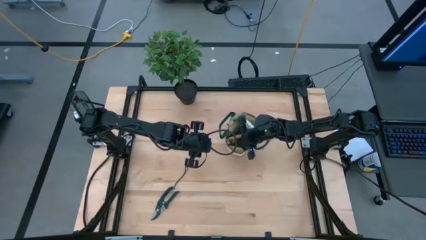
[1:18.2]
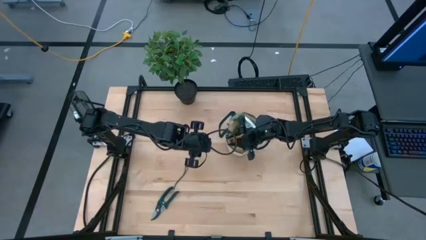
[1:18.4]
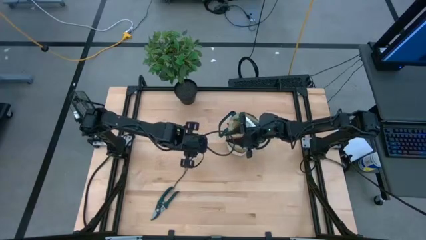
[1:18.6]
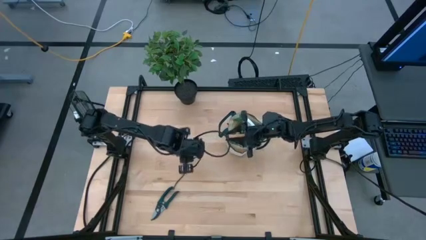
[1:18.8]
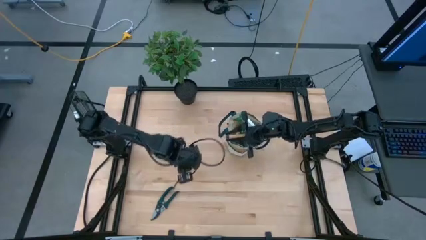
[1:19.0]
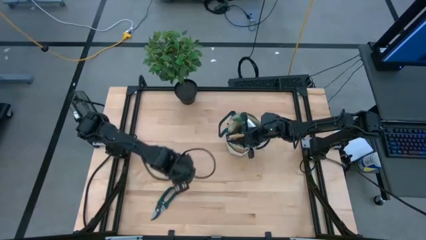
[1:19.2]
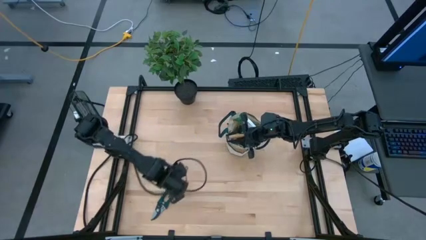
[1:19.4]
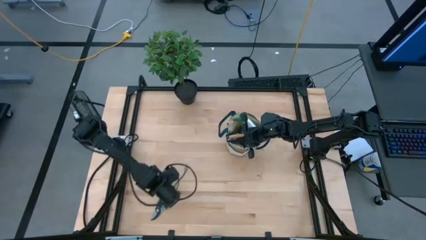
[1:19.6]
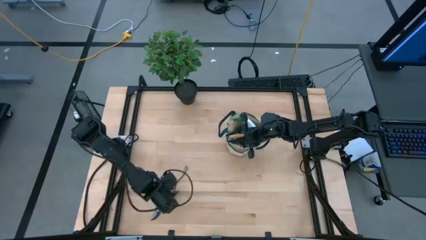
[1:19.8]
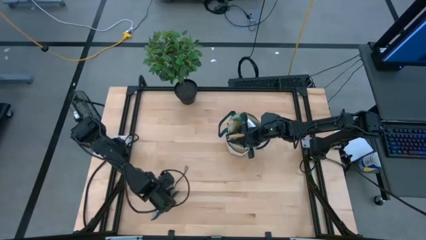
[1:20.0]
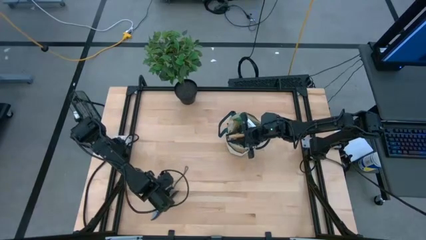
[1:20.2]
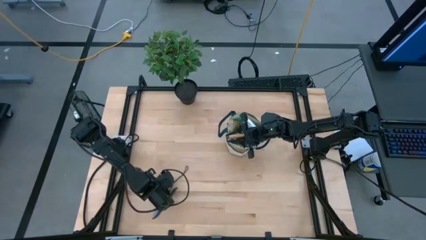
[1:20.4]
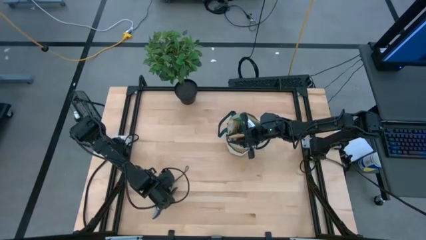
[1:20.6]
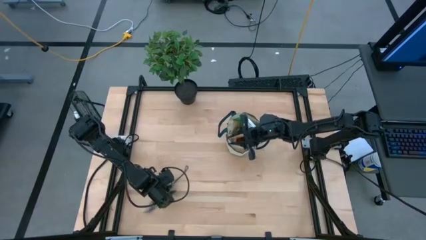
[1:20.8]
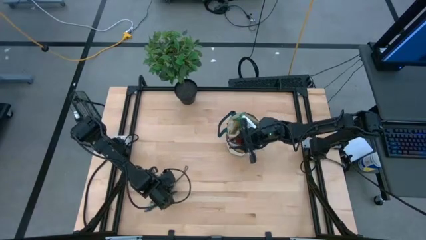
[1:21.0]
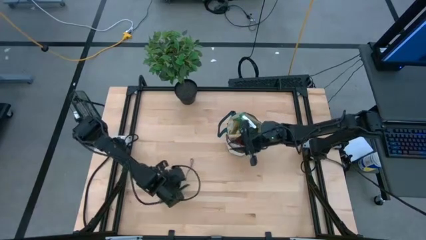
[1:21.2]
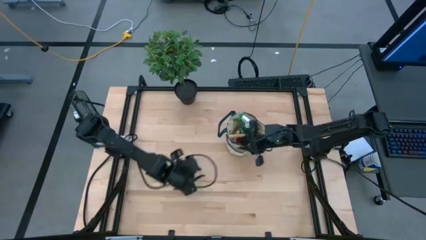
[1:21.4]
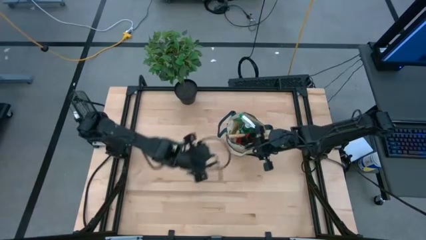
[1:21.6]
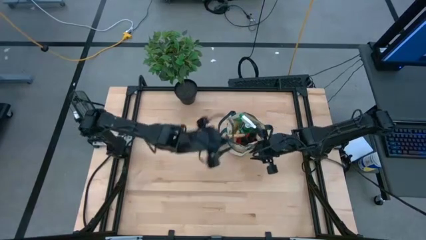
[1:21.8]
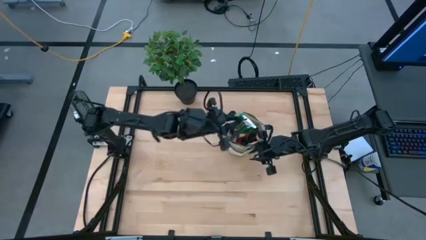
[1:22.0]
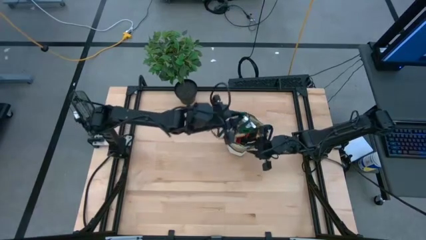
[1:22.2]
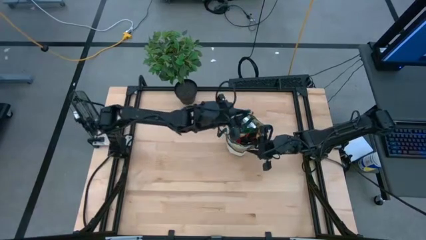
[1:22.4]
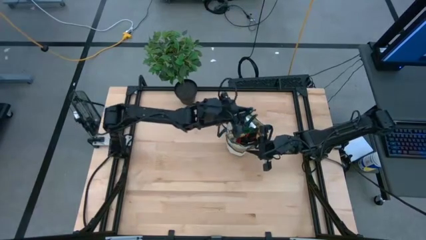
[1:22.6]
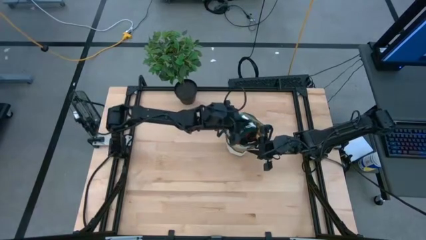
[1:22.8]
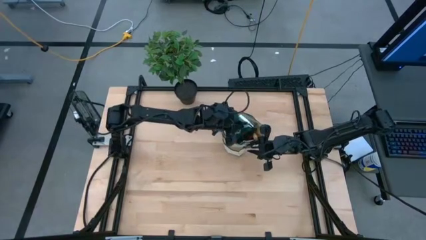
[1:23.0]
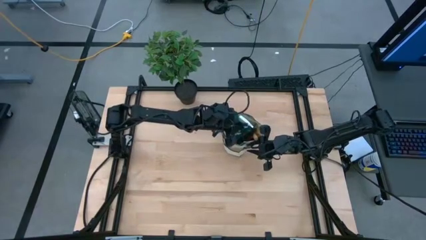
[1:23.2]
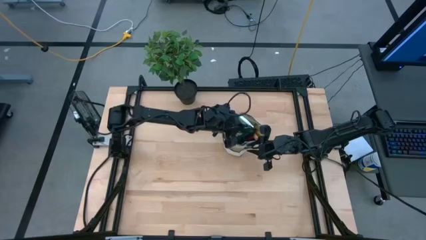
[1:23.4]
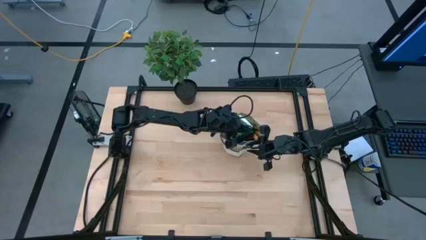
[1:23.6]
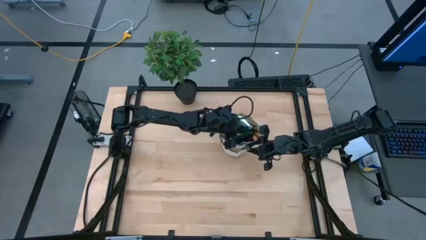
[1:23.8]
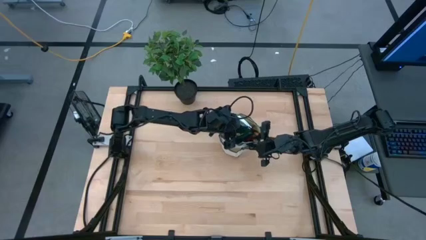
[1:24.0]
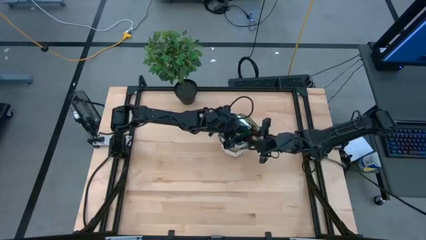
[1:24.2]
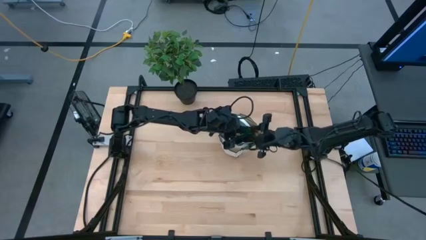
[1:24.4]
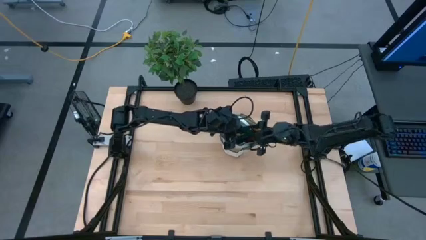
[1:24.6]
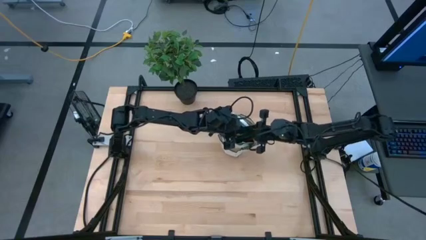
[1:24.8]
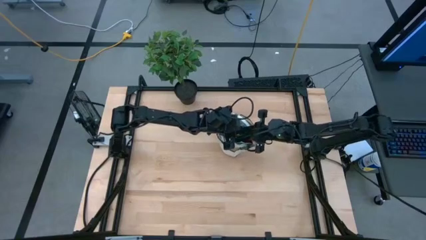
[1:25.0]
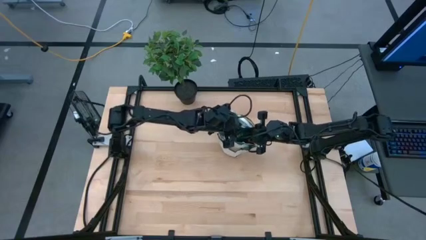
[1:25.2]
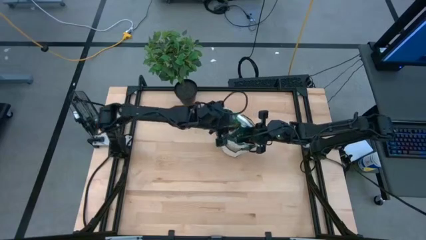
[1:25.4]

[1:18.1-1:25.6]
Task: Pick & Place Garden tools in Gardening bag
Put the green shear scissors into the light brown gardening bag

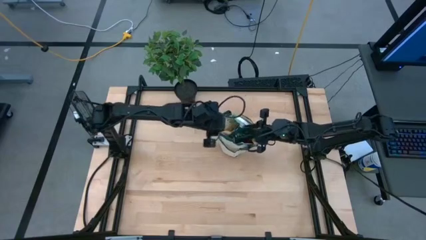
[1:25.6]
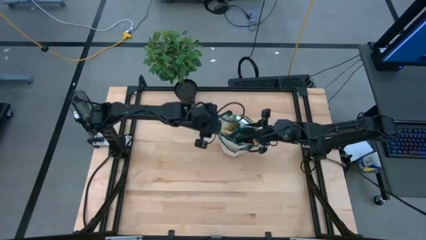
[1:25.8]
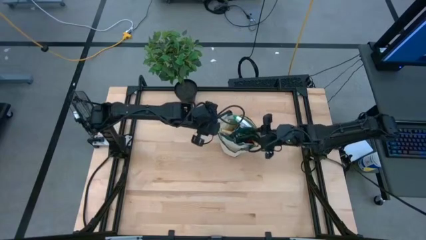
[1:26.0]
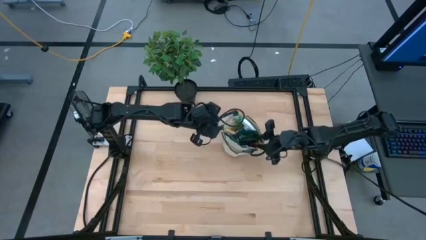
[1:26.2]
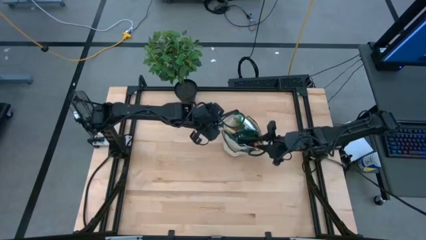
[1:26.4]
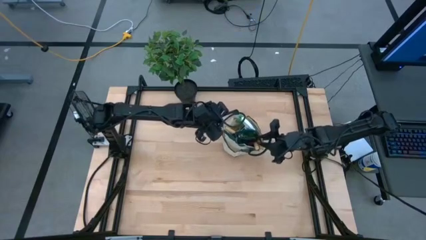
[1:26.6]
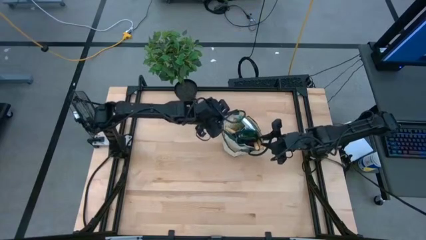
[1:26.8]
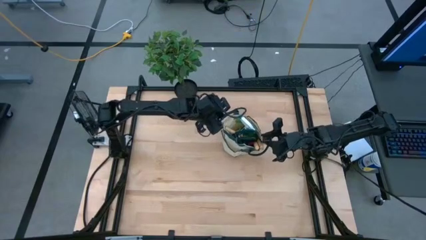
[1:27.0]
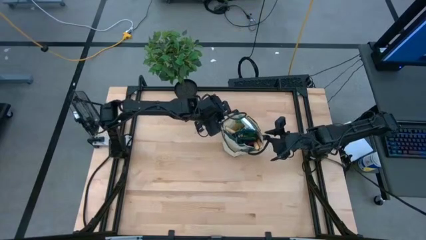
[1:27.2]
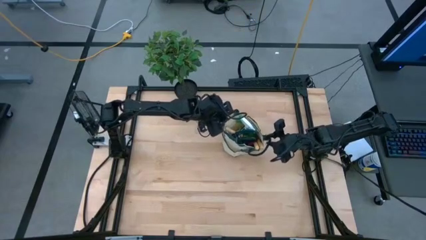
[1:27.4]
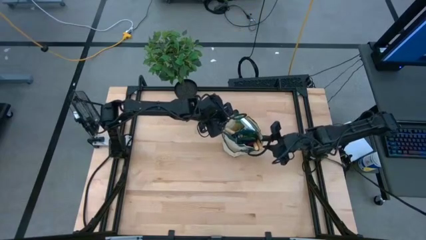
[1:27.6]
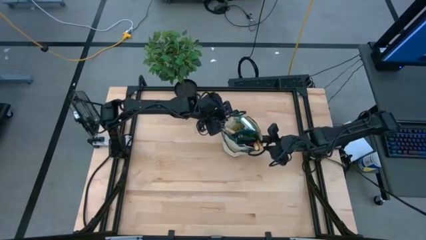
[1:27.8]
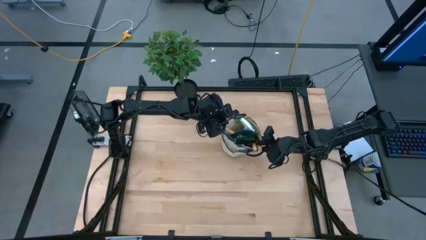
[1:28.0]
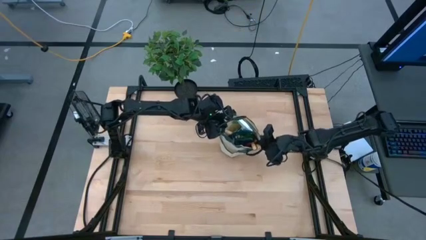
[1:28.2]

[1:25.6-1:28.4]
Adjust the light brown gardening bag

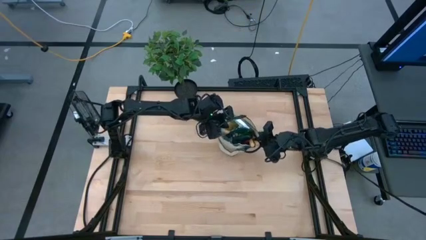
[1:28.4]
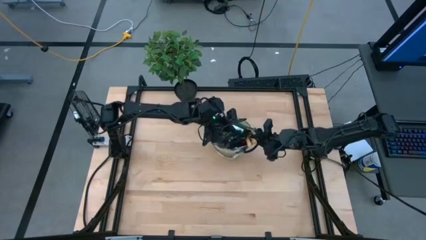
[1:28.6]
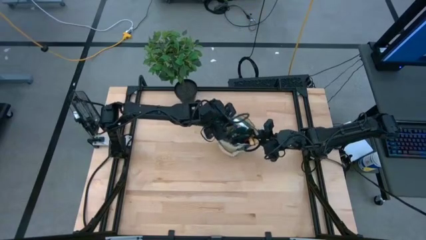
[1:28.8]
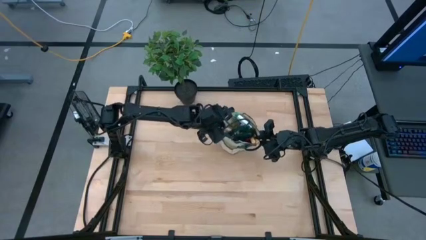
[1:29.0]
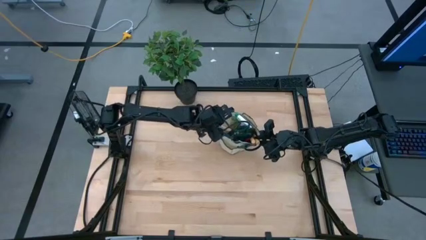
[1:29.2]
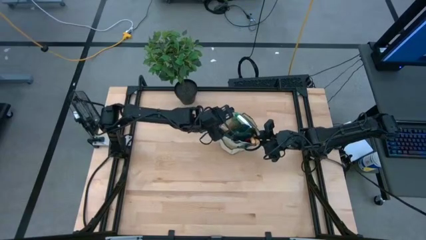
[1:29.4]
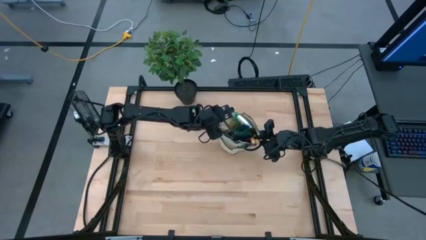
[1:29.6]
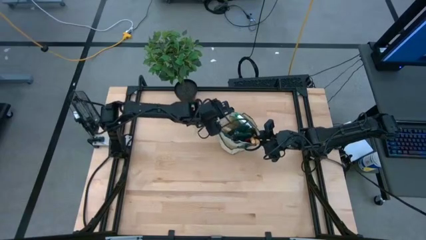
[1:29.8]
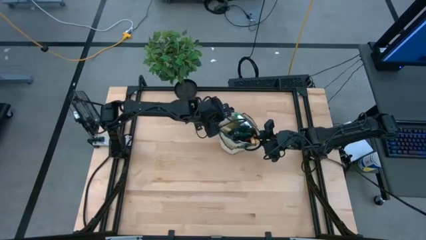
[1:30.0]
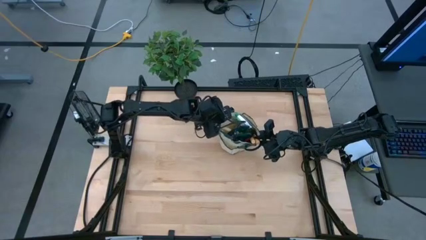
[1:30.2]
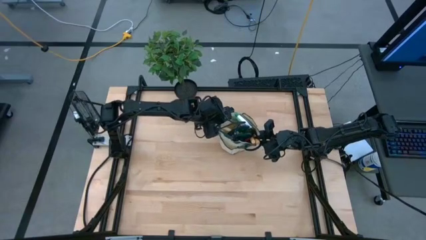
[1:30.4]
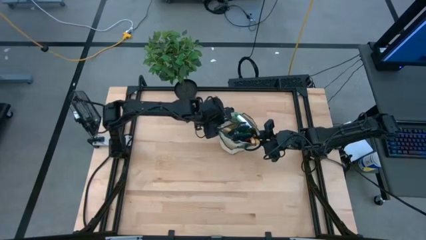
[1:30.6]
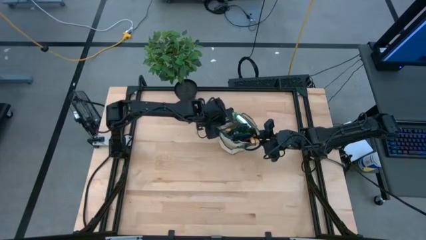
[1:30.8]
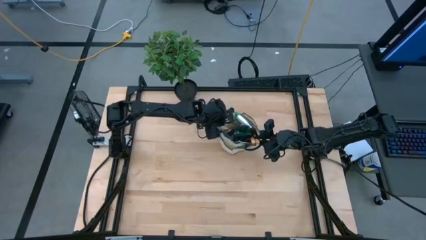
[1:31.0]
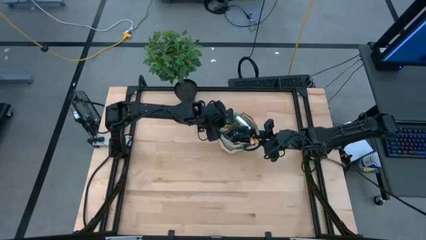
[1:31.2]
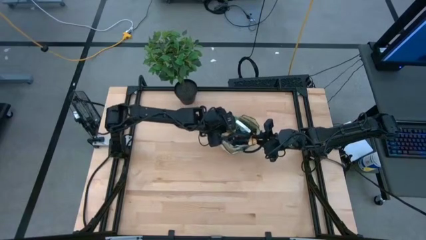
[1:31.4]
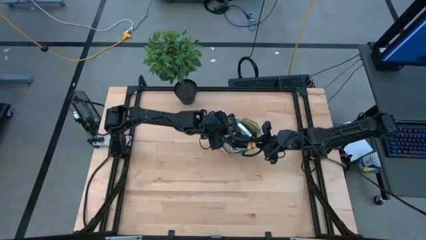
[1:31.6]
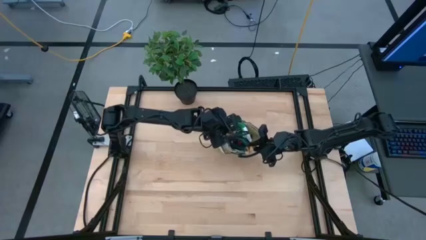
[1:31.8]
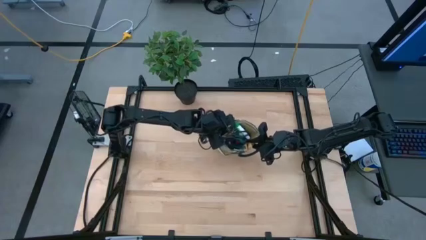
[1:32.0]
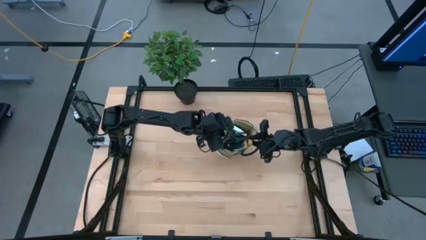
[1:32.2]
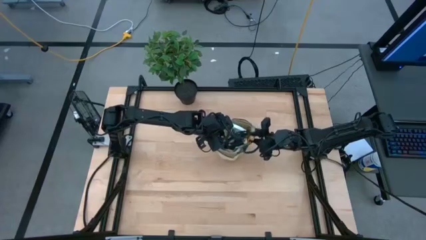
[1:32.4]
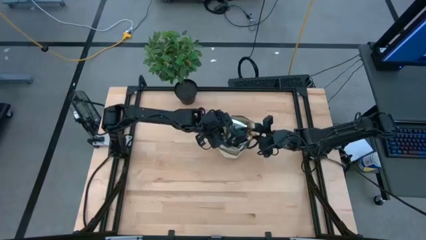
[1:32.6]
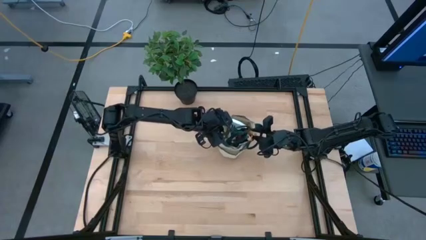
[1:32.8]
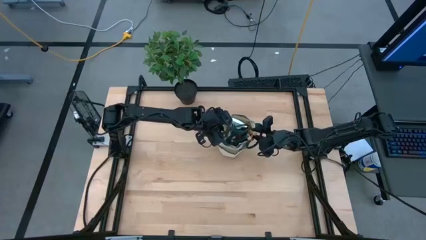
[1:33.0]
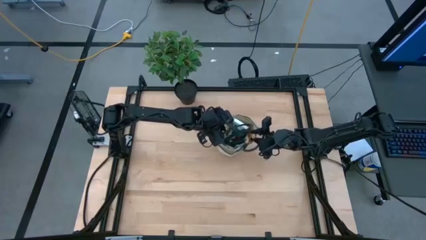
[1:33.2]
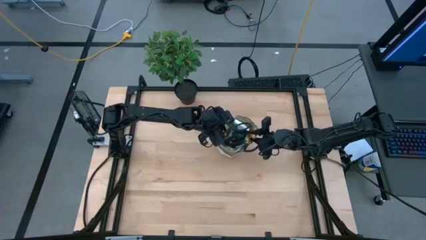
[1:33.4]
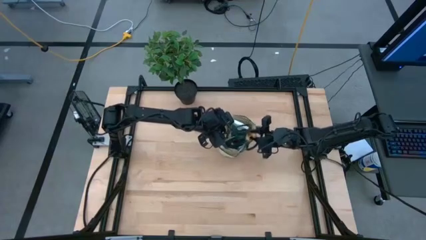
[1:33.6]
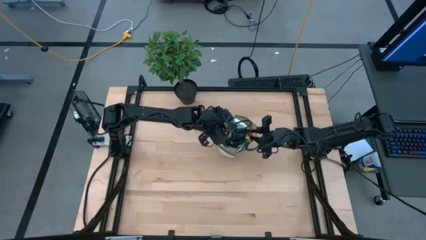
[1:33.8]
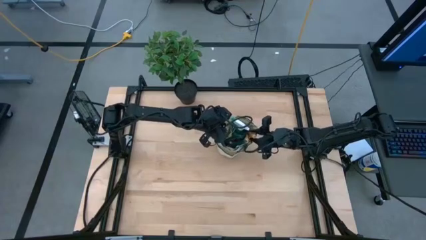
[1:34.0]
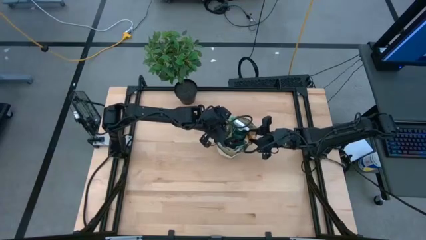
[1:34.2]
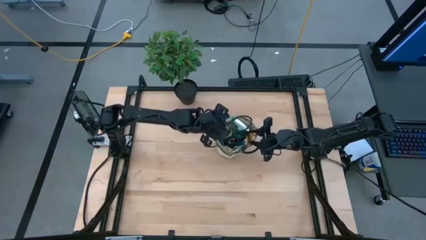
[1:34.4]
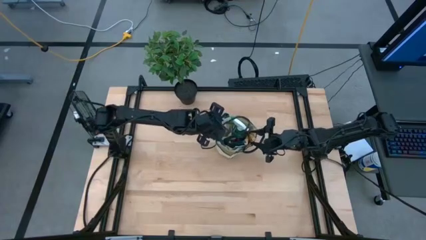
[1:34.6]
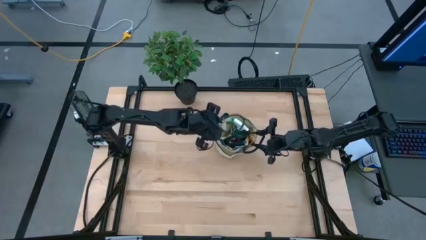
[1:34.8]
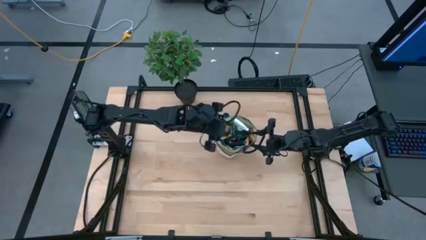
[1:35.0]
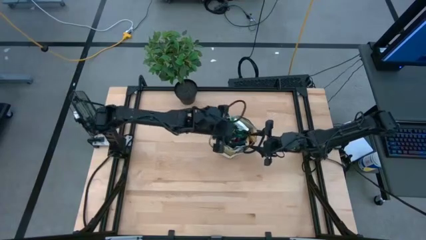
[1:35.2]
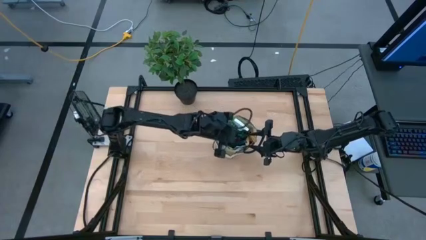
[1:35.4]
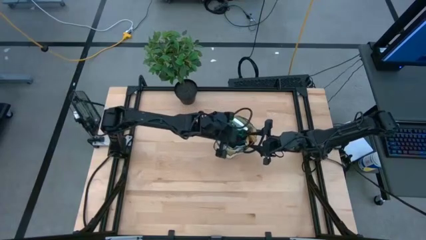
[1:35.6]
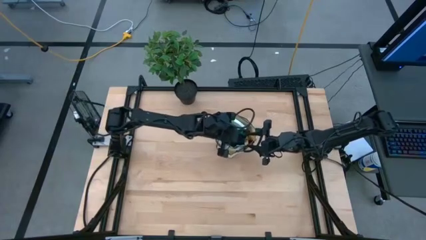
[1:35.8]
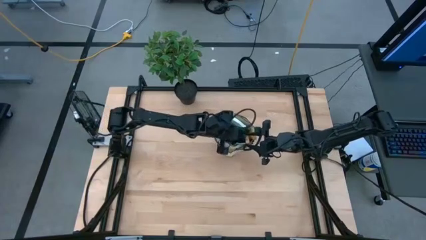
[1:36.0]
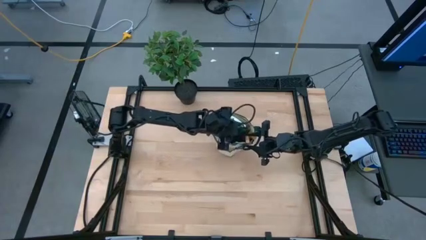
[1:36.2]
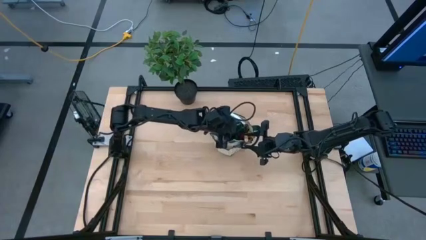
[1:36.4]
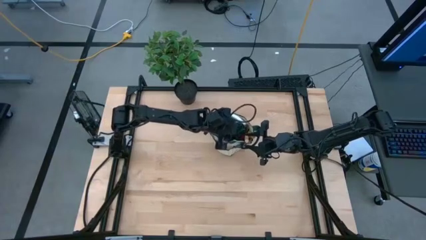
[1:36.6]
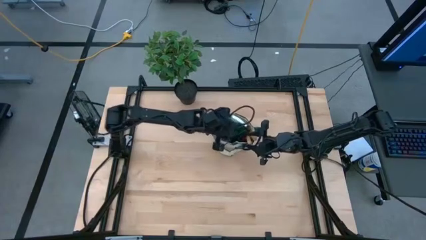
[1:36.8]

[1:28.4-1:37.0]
Adjust the light brown gardening bag
